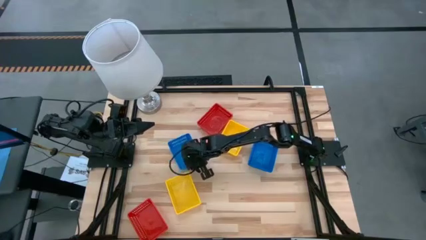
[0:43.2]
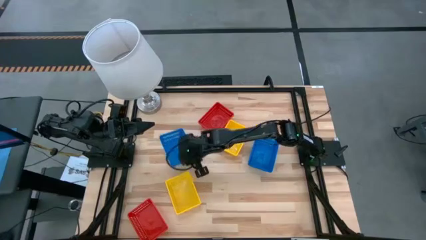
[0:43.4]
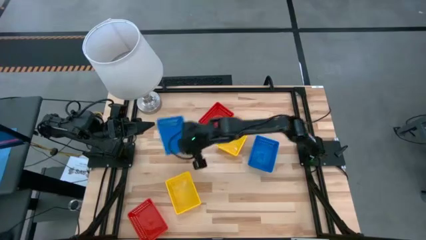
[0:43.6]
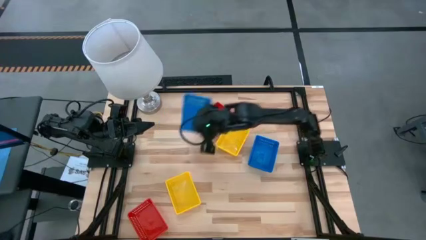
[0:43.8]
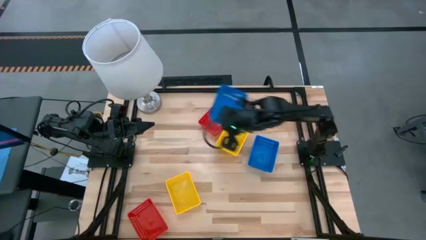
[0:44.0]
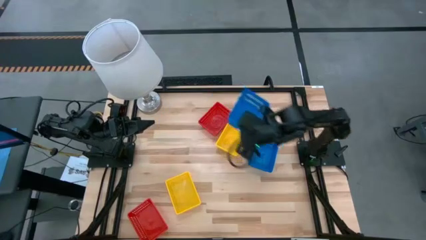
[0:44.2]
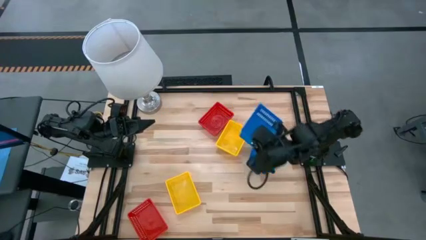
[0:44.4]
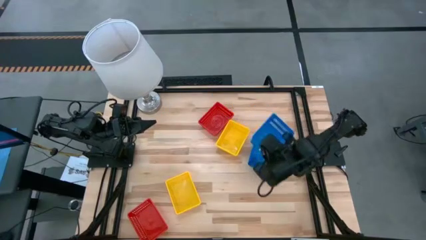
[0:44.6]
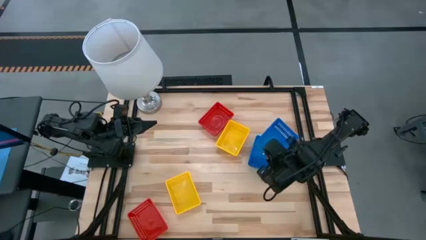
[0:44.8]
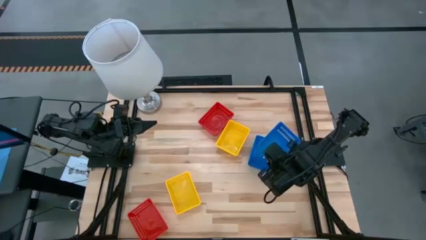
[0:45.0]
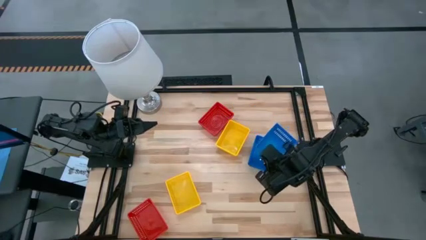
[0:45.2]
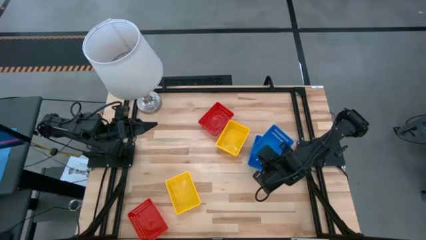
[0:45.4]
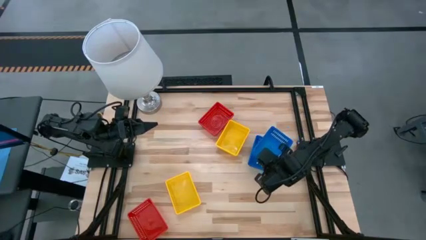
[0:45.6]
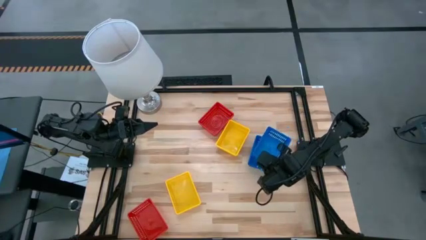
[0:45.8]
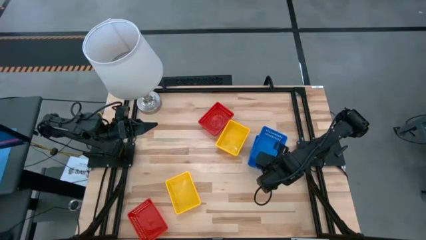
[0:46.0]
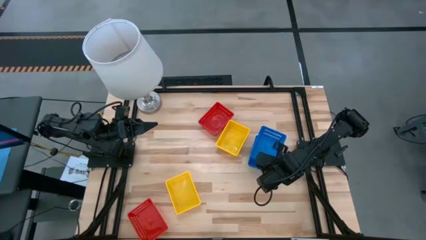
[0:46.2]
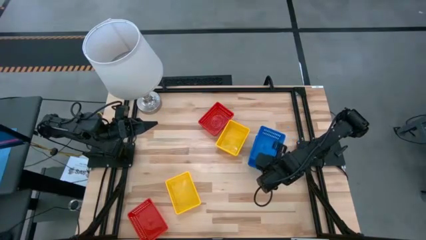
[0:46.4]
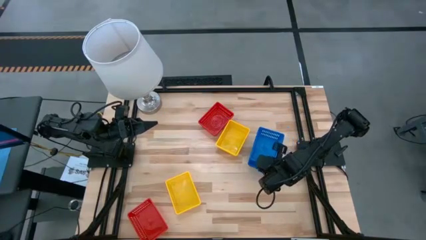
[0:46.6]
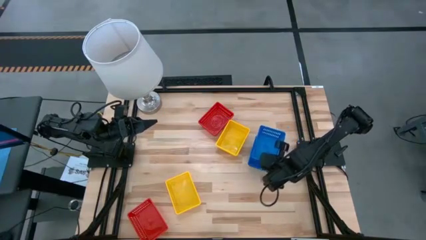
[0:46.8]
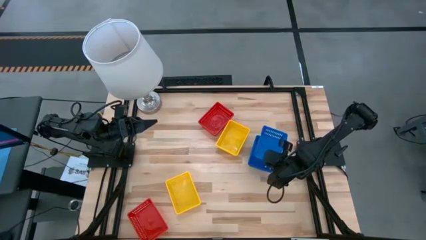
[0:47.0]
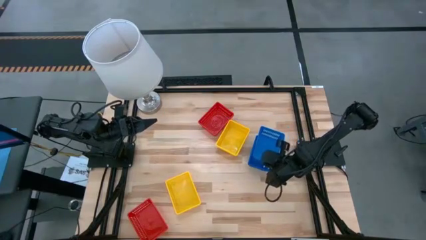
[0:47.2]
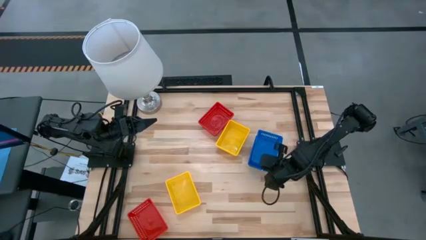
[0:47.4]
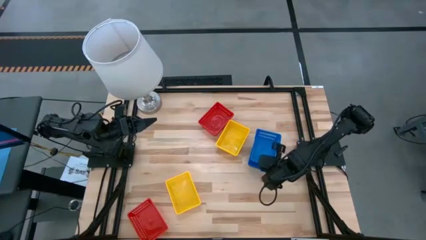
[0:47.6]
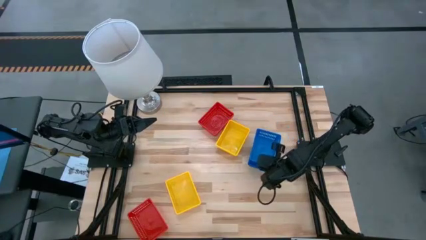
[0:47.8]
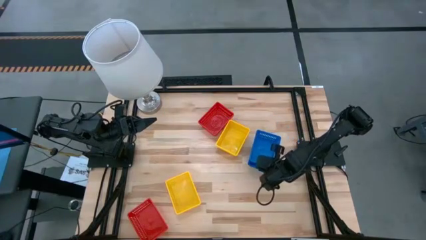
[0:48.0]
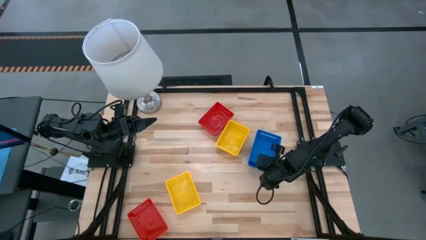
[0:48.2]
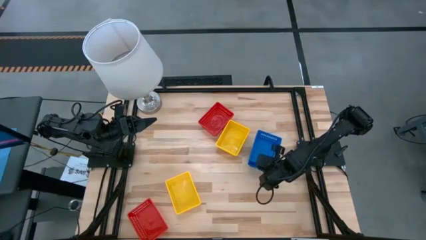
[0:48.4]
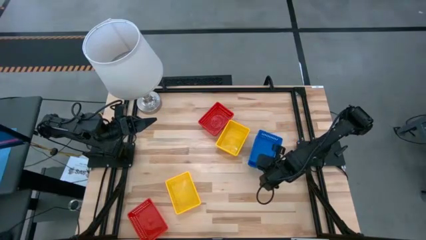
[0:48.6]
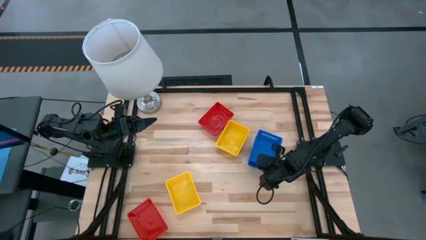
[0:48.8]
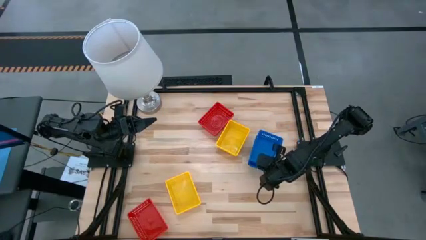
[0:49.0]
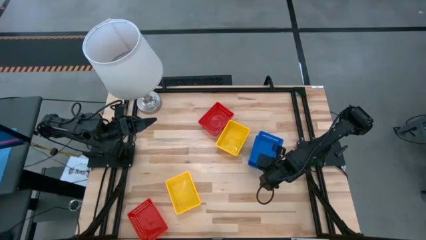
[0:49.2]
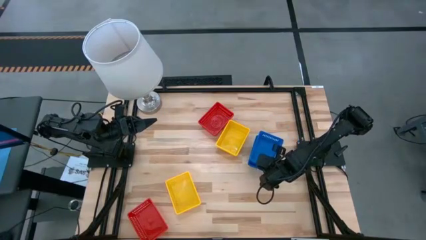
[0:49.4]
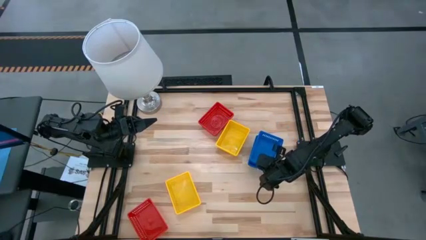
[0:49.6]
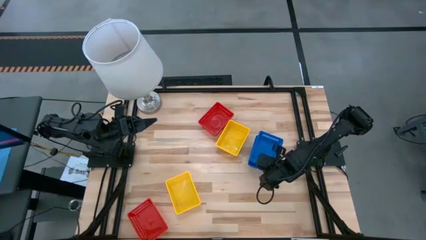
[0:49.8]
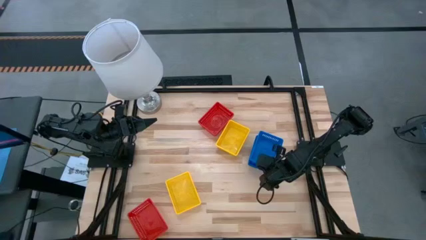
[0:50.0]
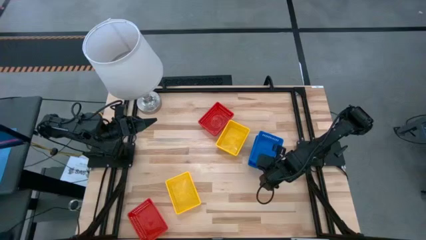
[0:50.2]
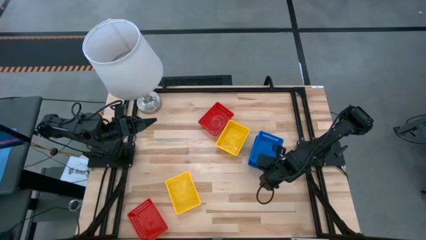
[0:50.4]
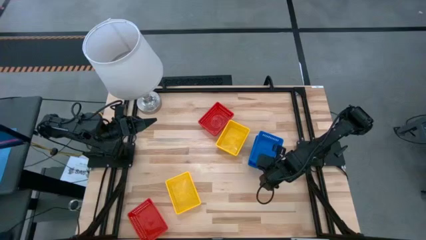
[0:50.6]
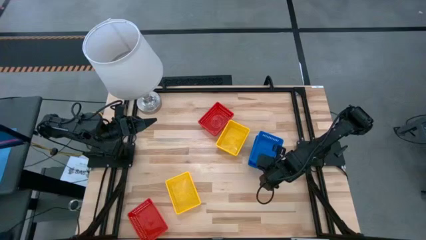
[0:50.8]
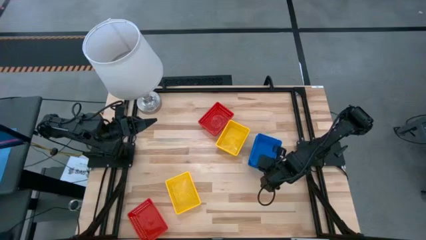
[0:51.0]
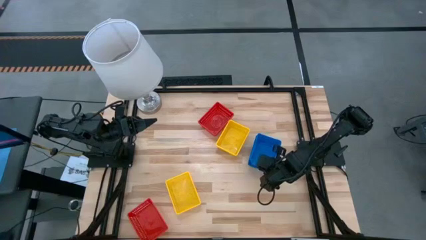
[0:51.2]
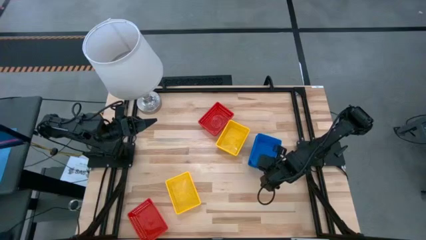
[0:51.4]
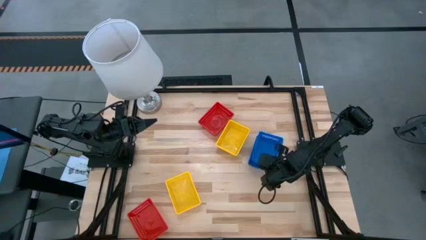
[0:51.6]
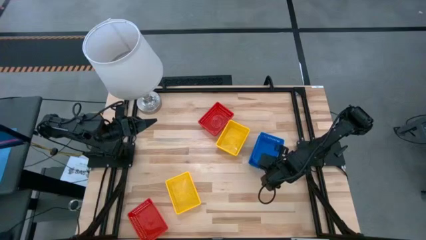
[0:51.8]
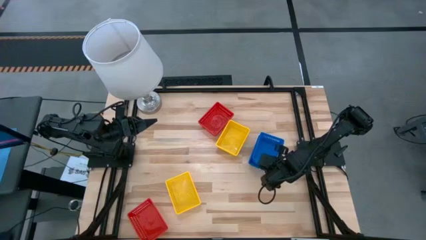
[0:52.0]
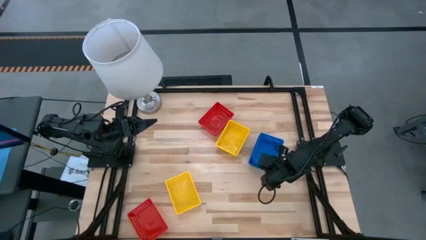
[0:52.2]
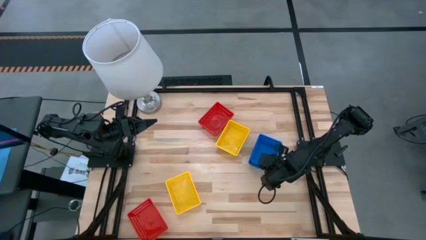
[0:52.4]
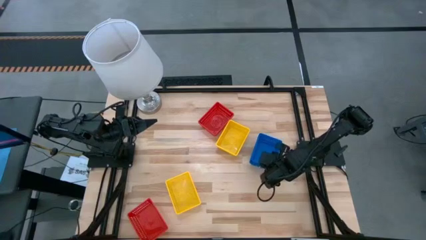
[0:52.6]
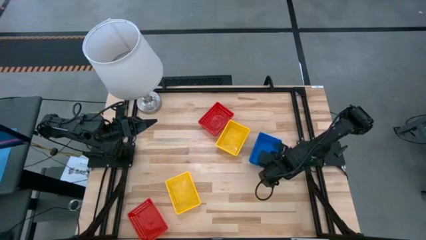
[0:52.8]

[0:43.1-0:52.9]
Stack the blue bin on the blue bins

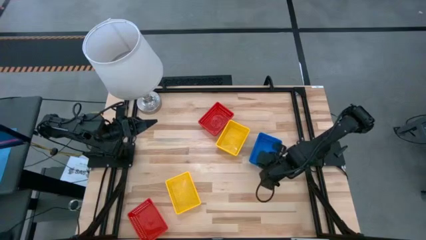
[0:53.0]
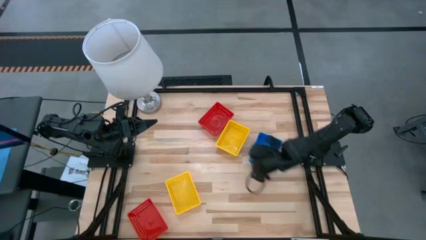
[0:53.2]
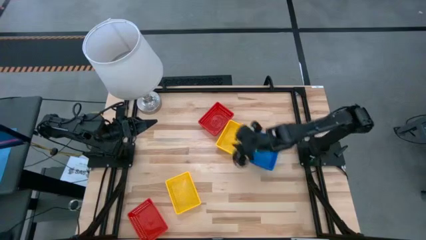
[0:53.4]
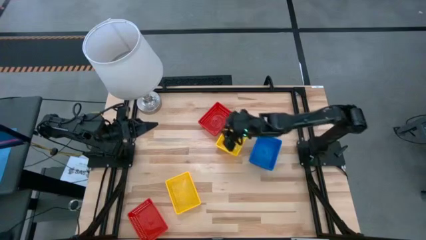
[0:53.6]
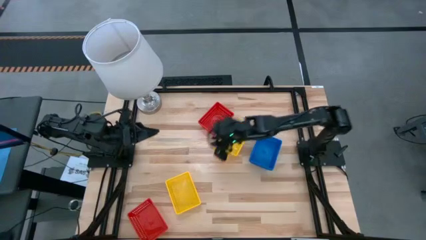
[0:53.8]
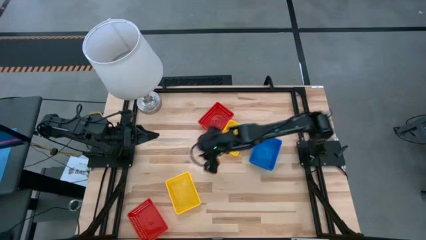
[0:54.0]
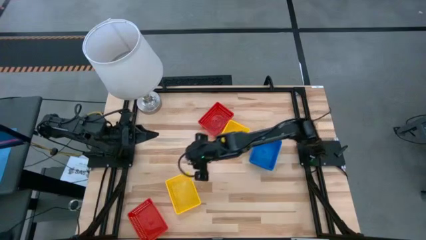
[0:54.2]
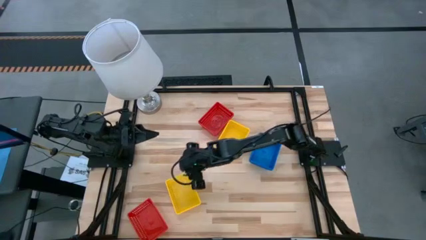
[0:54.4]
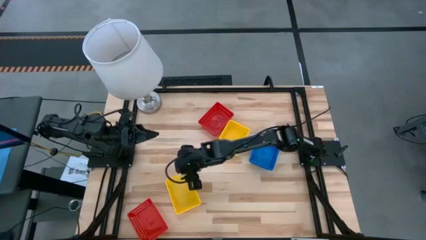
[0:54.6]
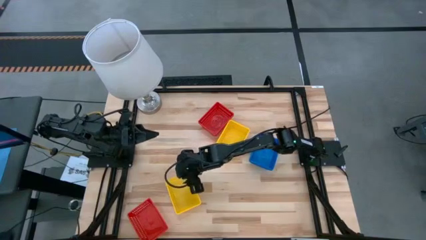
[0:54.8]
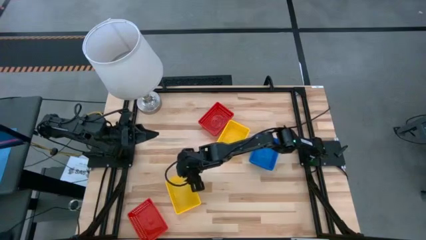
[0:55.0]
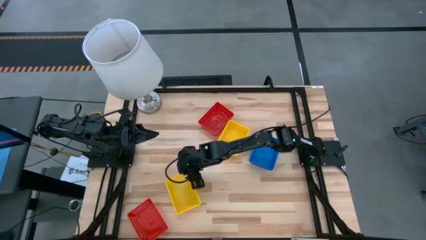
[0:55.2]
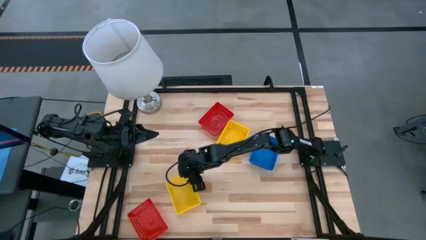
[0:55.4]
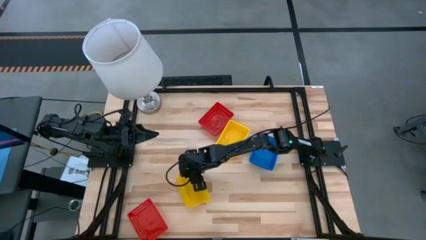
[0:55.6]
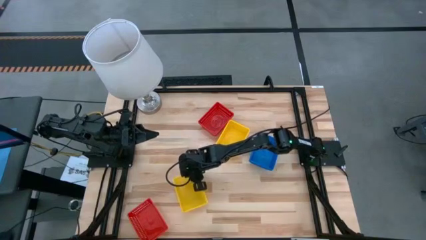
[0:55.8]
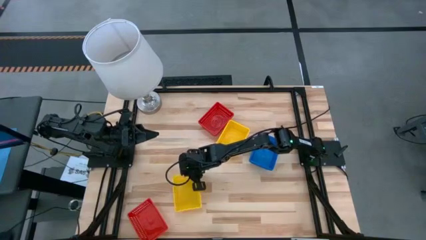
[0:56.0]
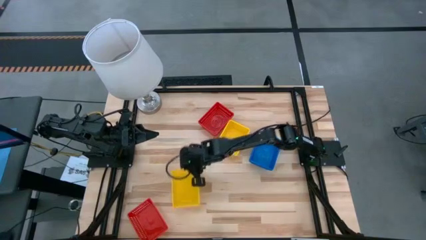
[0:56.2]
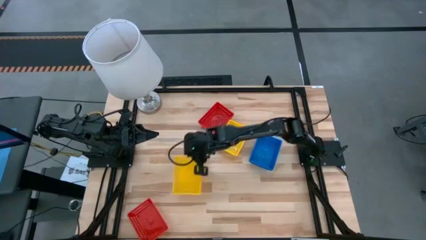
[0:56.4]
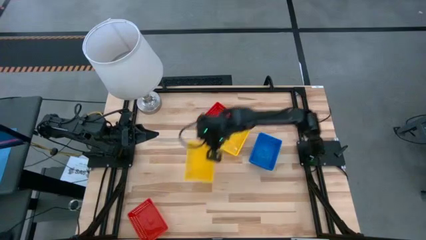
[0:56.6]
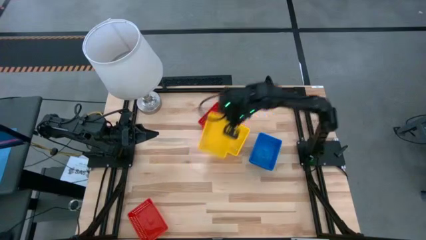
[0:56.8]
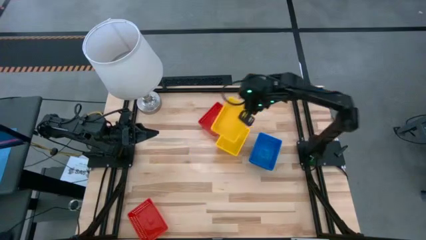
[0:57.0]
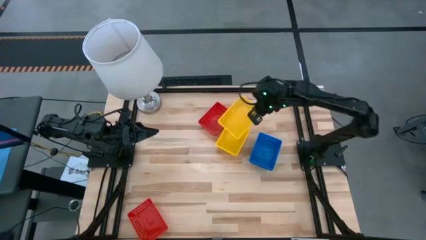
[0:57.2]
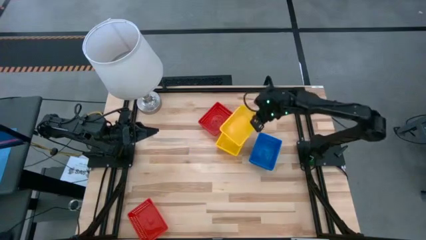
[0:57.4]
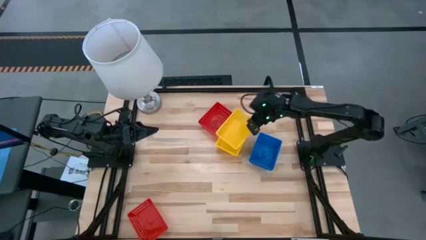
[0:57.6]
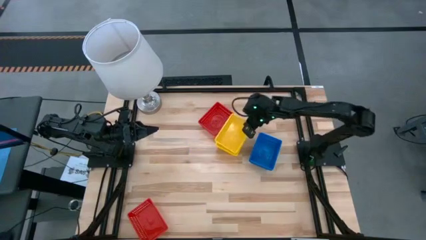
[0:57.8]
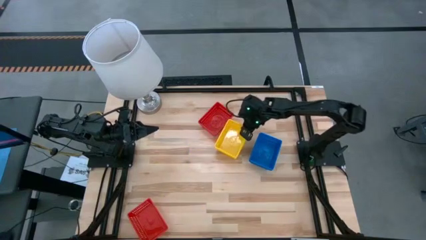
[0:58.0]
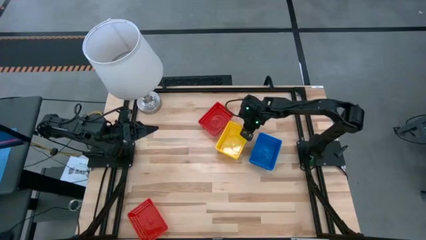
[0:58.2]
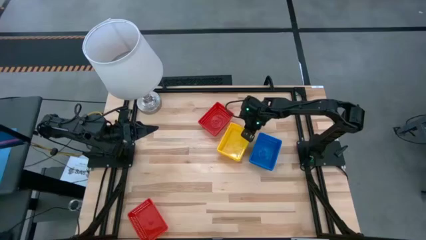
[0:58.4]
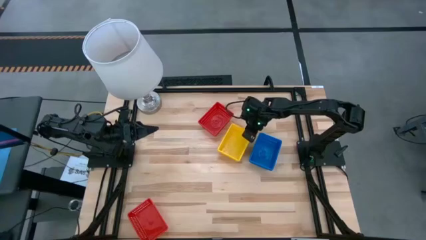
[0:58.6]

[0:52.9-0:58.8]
Stack the yellow bin on the yellow bins
